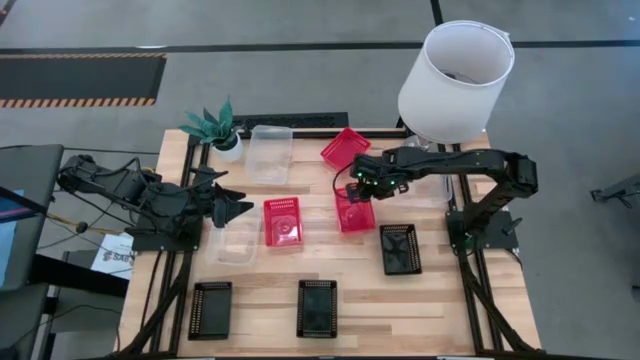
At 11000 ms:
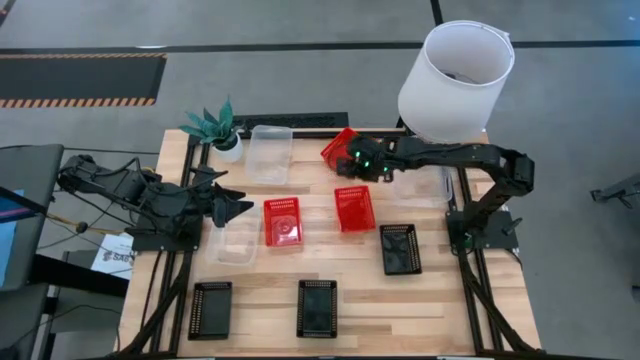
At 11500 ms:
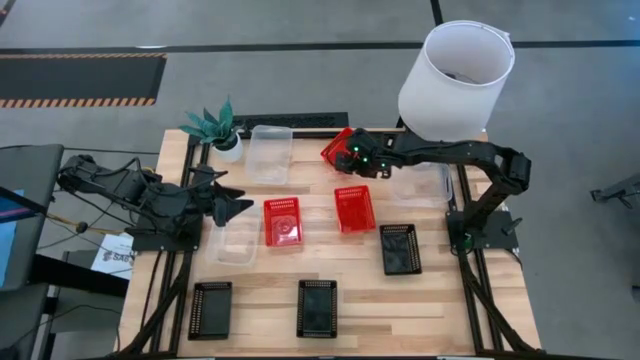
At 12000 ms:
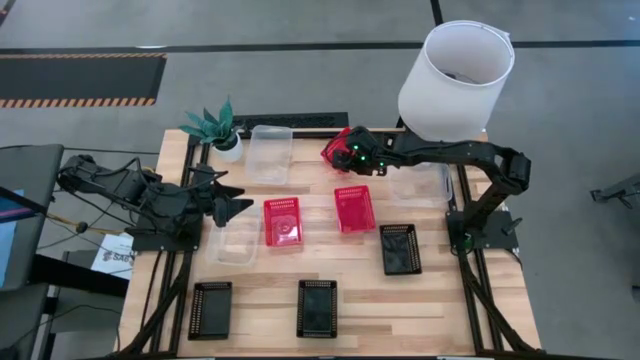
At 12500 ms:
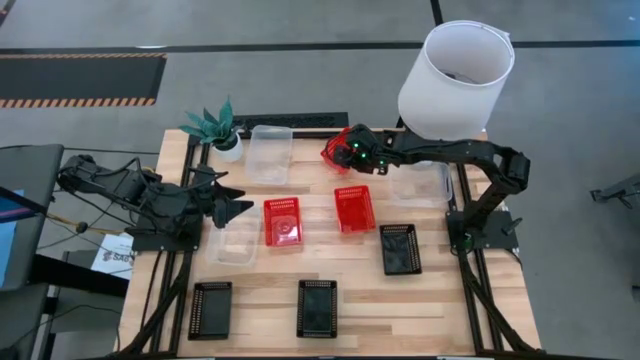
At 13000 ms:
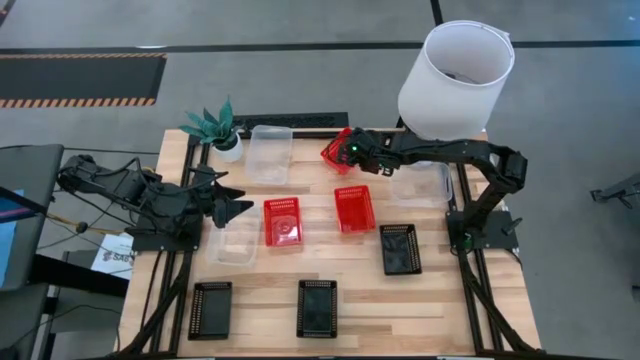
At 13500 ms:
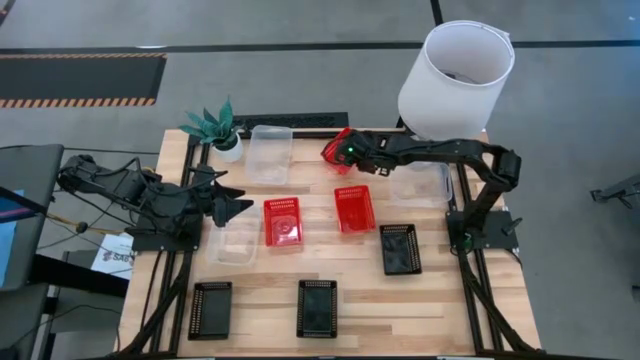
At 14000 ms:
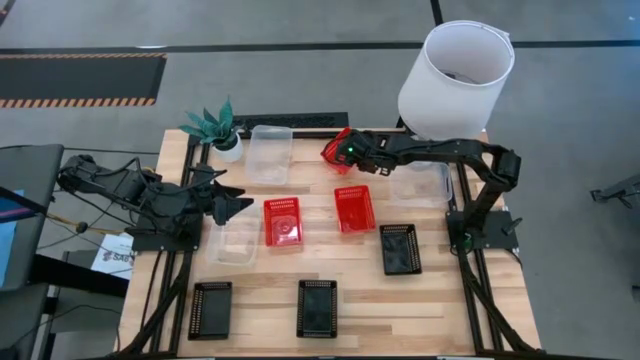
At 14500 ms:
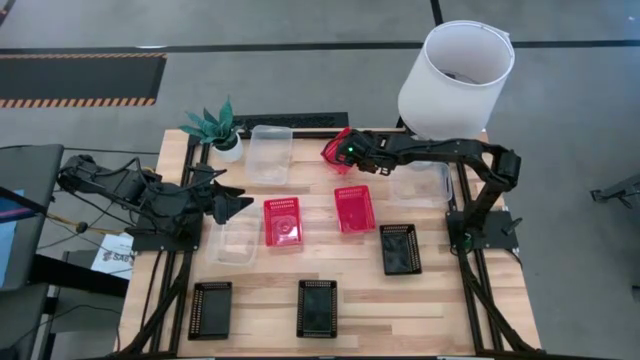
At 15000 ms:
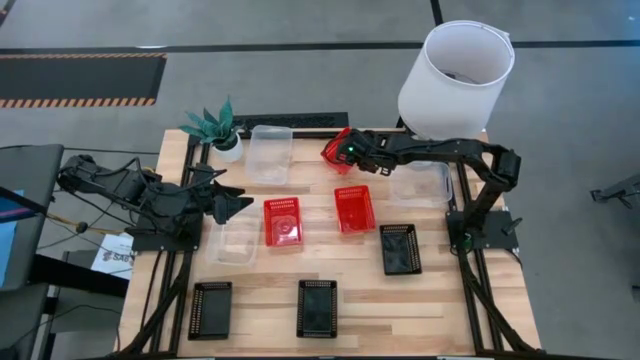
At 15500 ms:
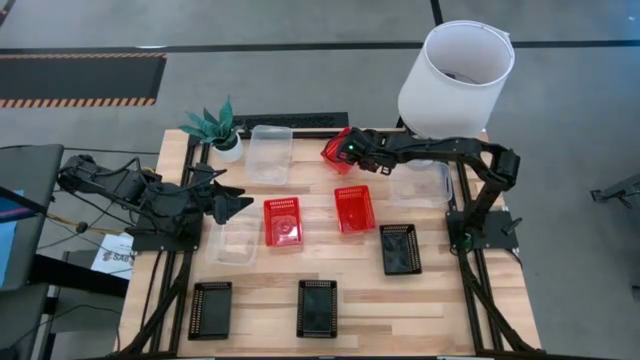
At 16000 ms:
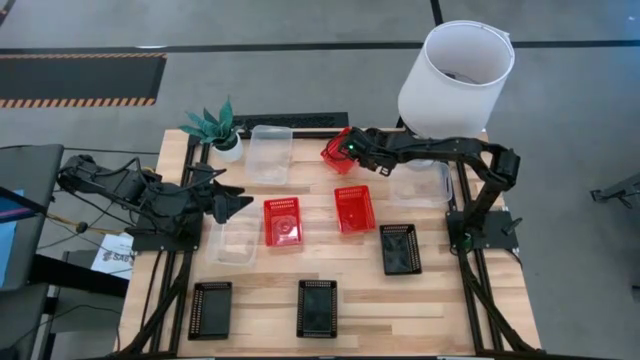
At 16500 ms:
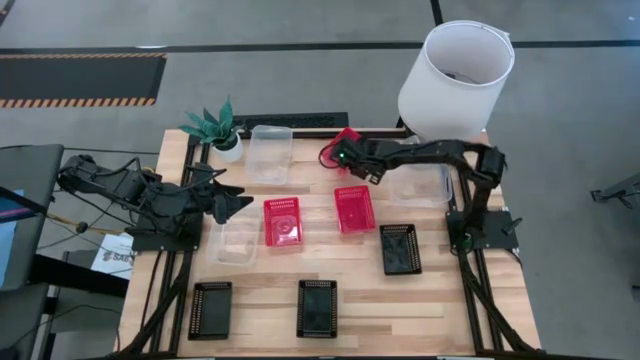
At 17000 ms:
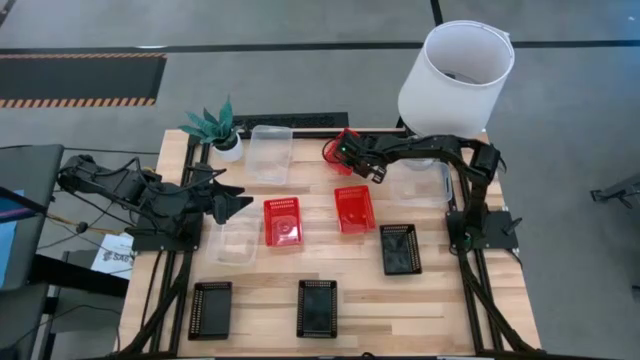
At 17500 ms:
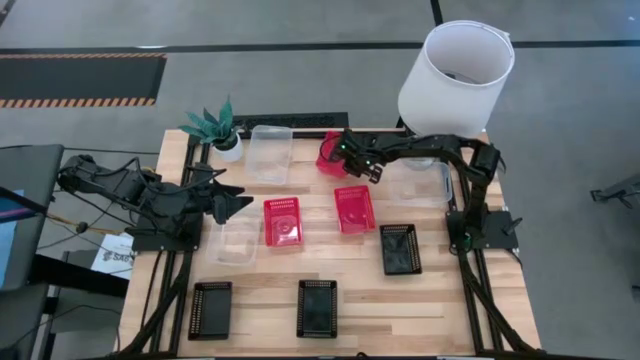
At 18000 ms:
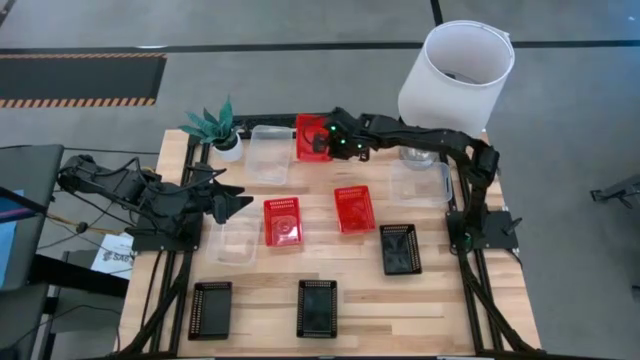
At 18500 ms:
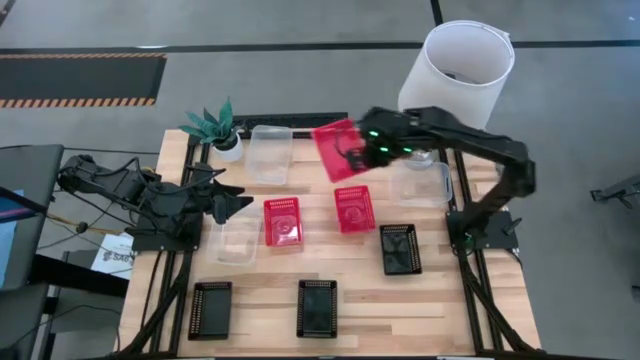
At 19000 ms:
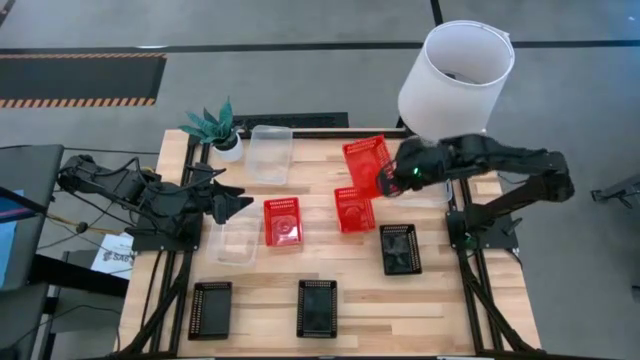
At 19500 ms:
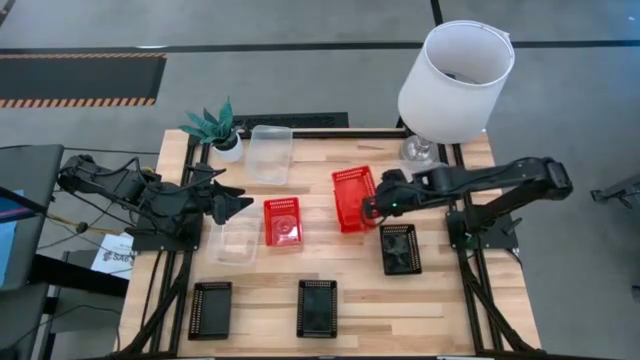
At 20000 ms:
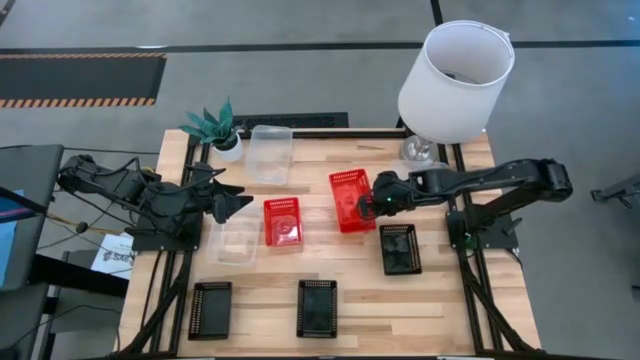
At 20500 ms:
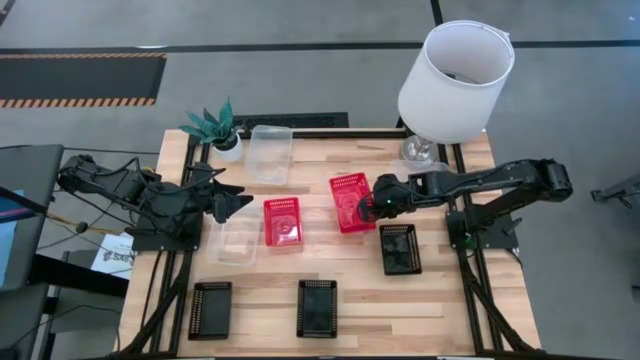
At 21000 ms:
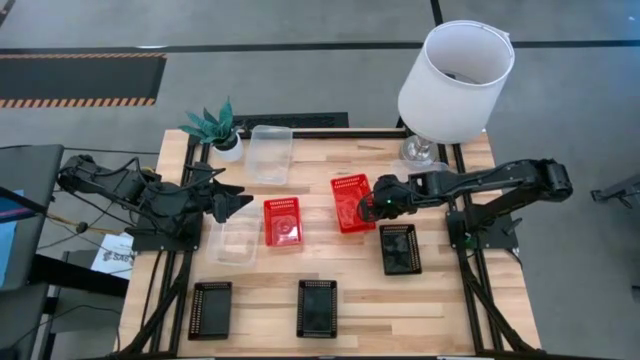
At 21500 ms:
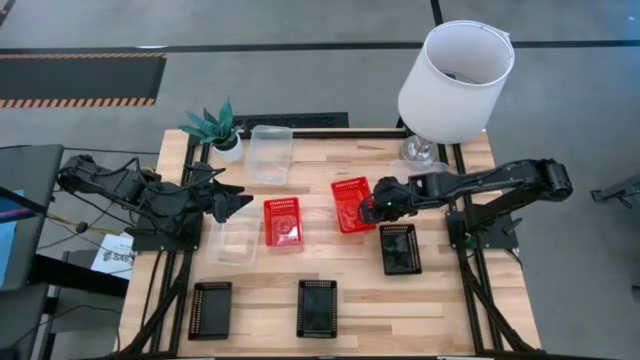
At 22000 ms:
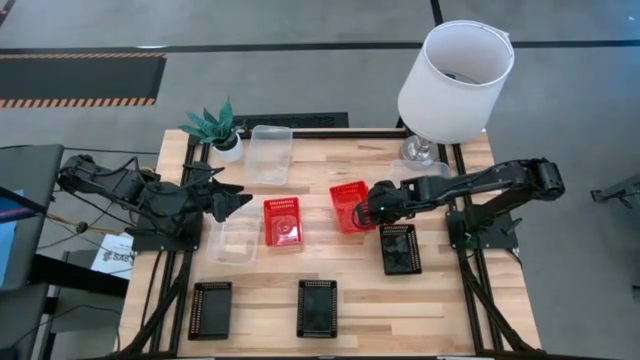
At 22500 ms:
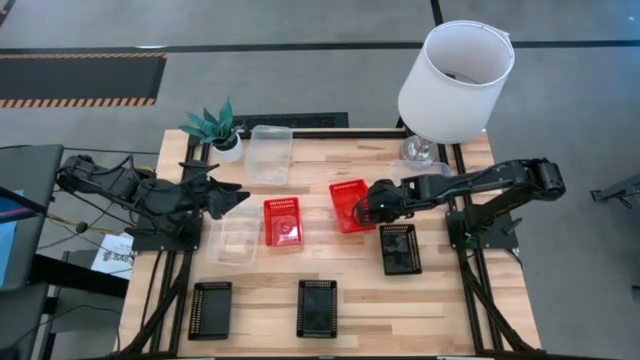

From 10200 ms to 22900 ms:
Stack the top red bin on top of the bottom right red bin

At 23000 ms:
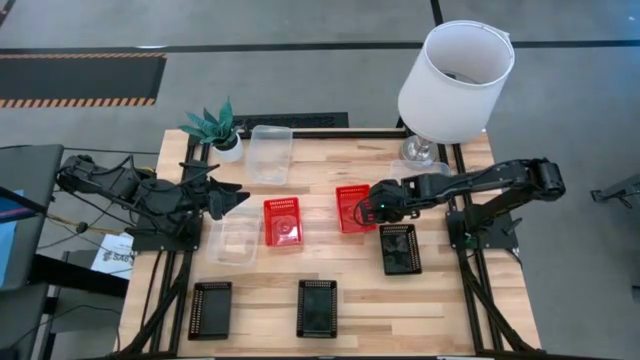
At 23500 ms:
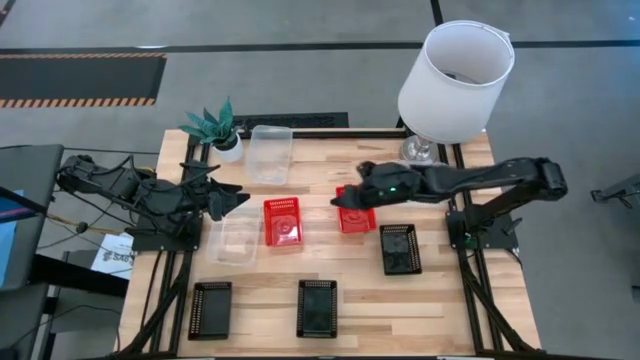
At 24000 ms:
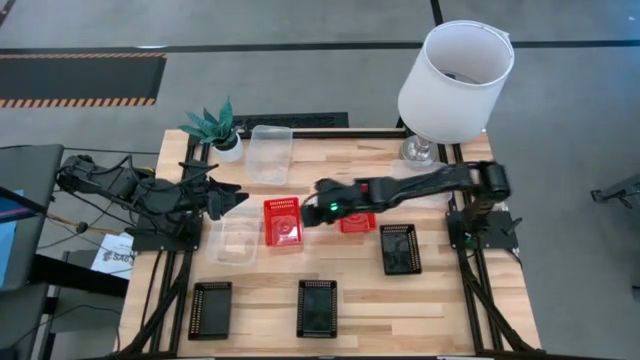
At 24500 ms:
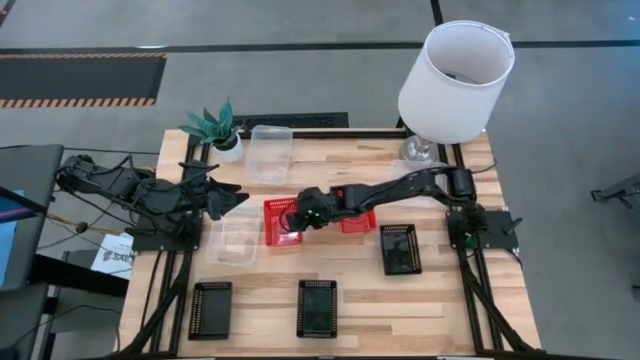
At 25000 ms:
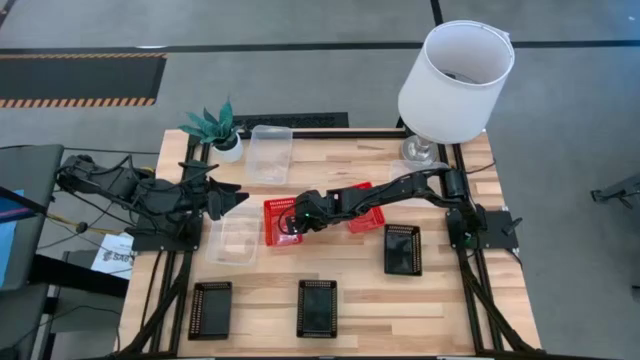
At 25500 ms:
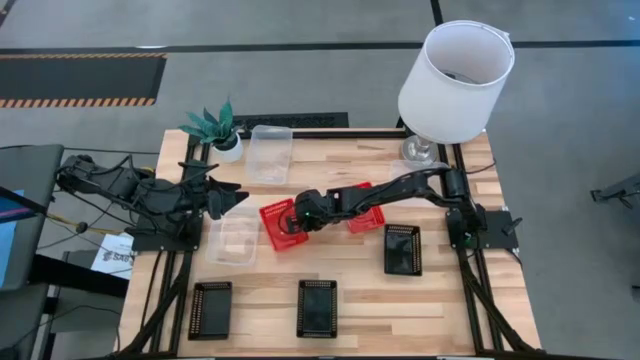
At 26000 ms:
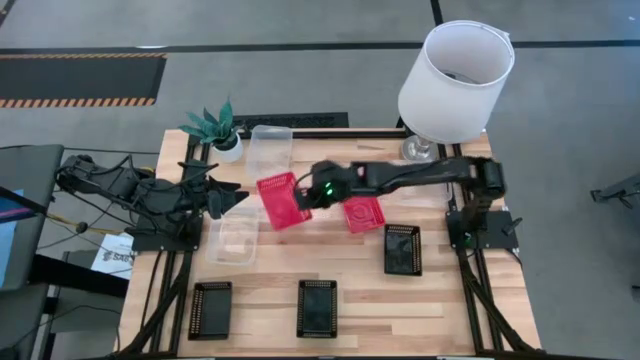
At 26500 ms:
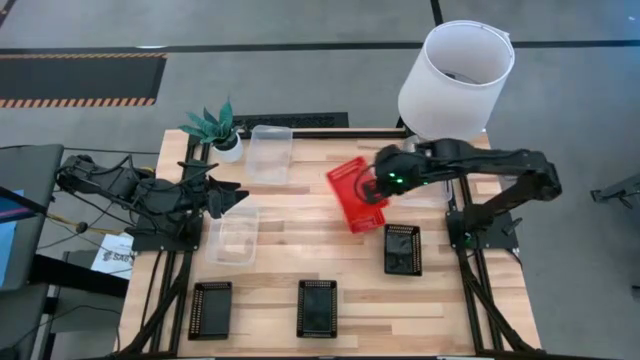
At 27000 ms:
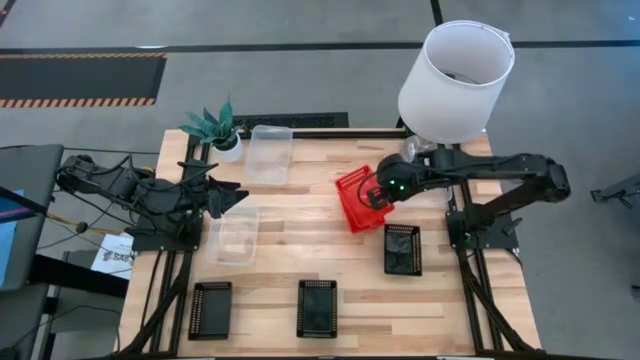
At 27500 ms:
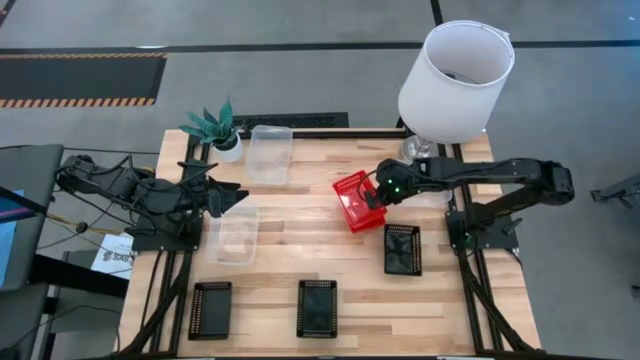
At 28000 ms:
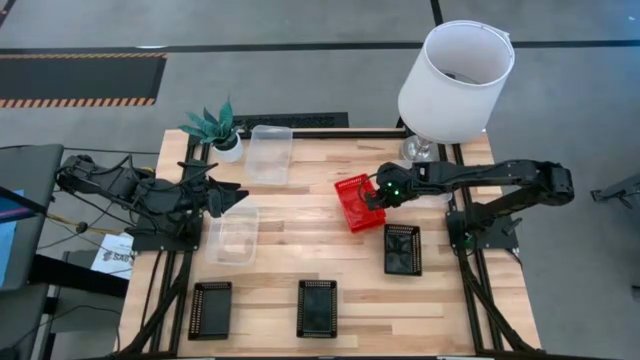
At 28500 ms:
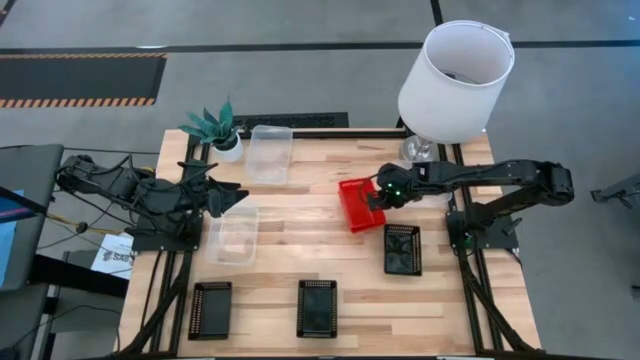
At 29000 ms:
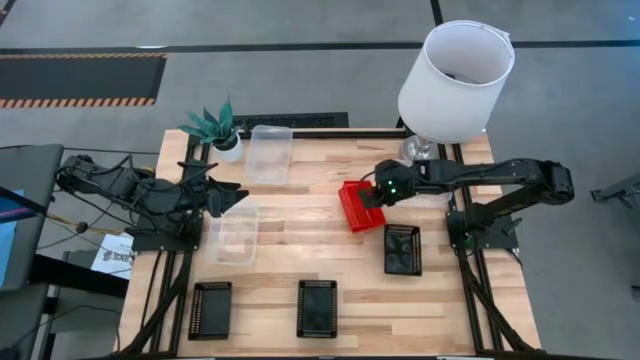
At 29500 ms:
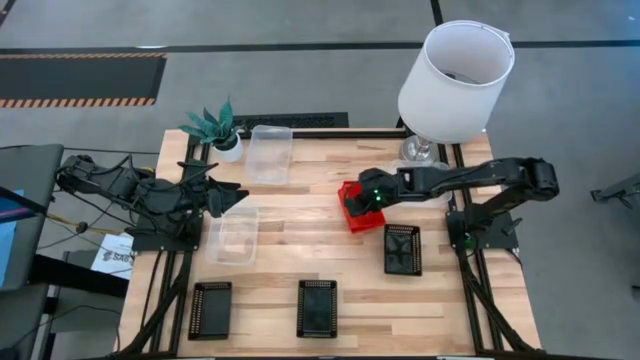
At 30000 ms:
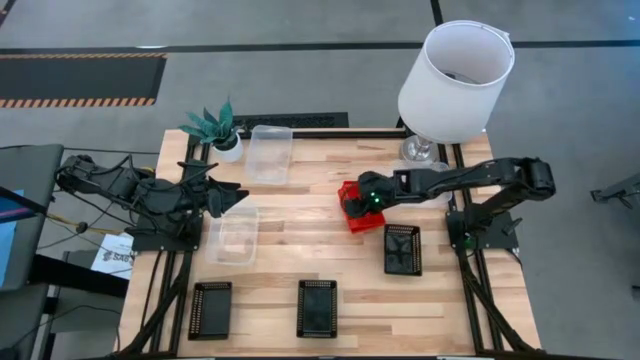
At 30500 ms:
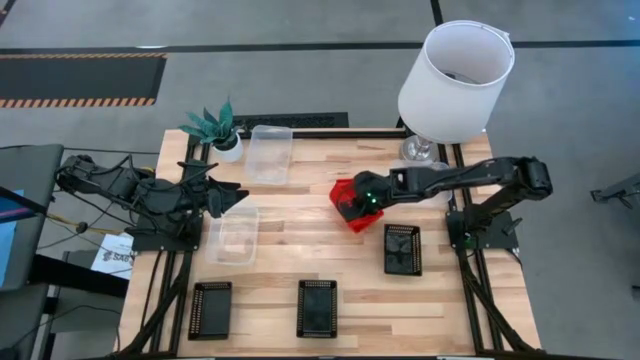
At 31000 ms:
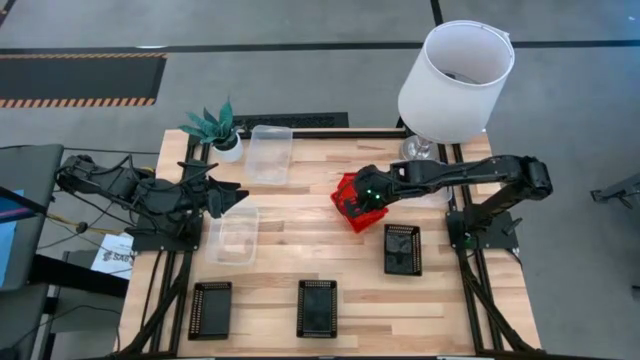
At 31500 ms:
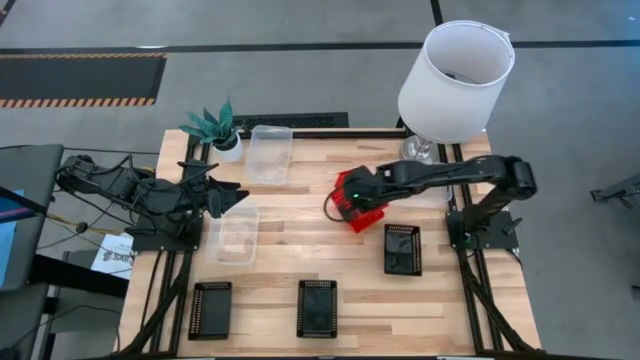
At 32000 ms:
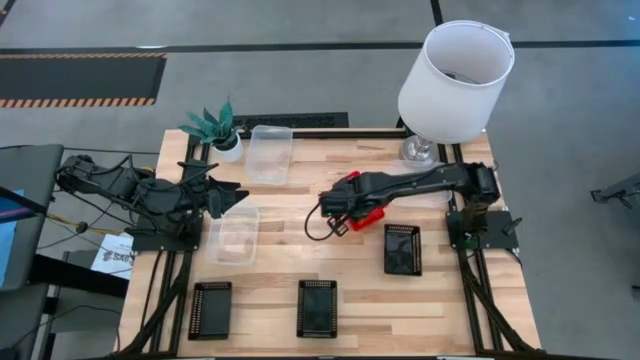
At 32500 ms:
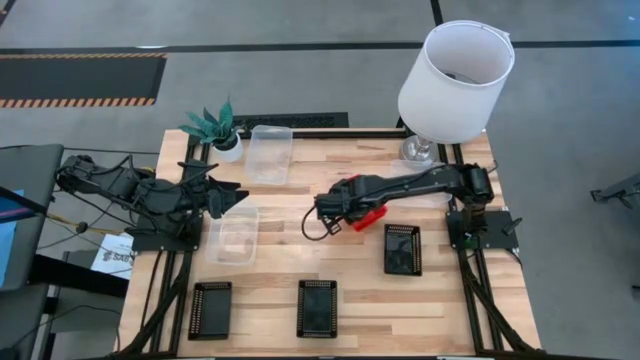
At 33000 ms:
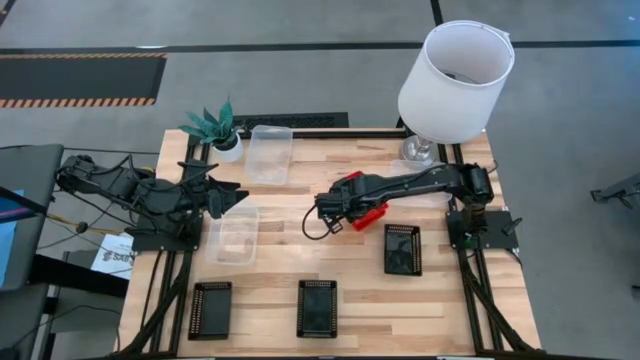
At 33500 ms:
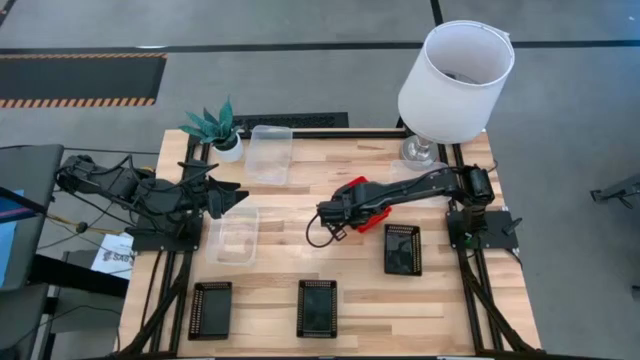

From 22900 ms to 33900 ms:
Stack the left red bin on top of the red bin
